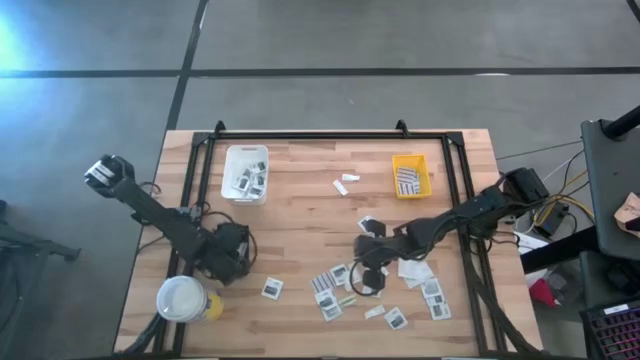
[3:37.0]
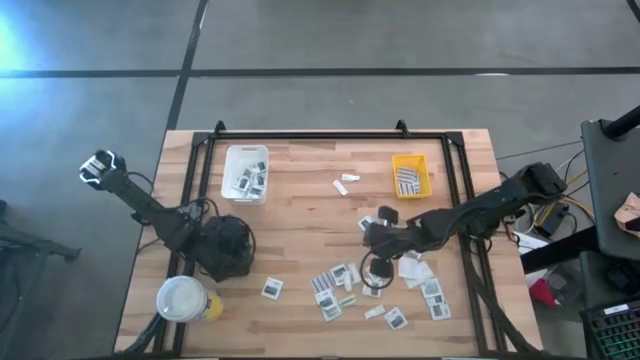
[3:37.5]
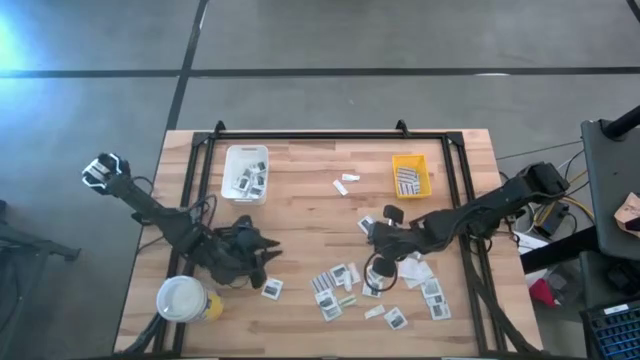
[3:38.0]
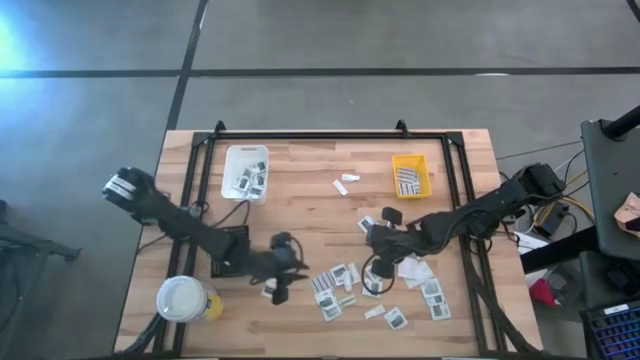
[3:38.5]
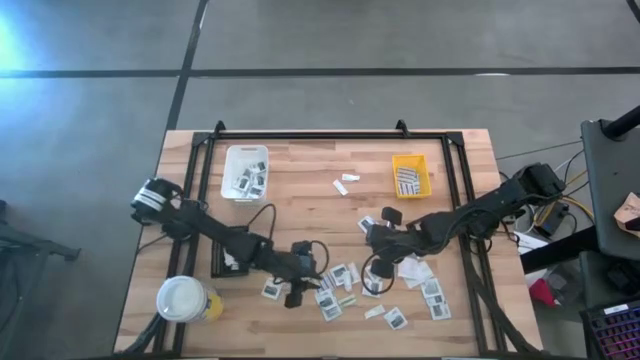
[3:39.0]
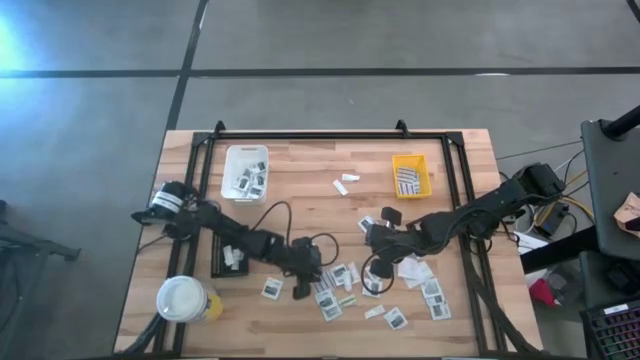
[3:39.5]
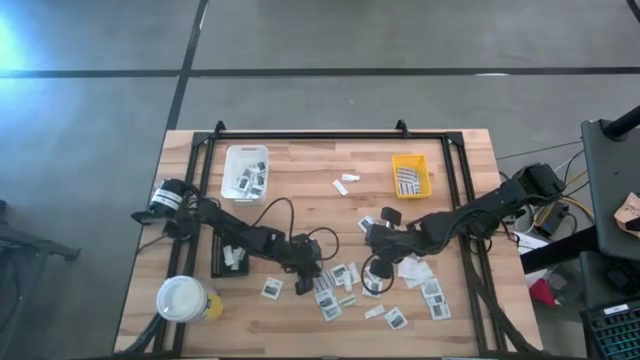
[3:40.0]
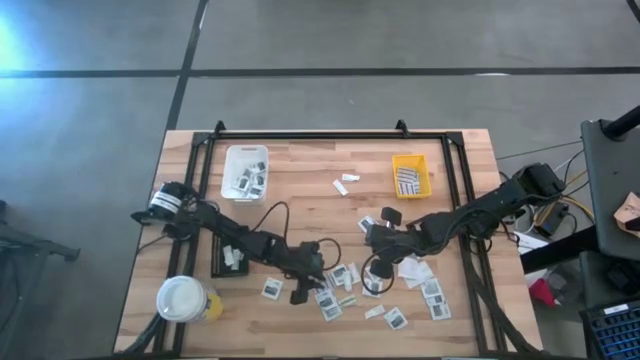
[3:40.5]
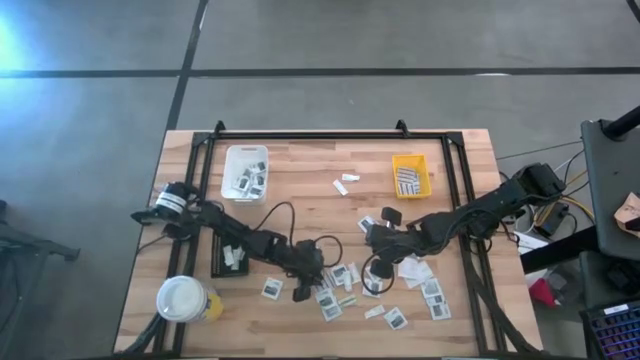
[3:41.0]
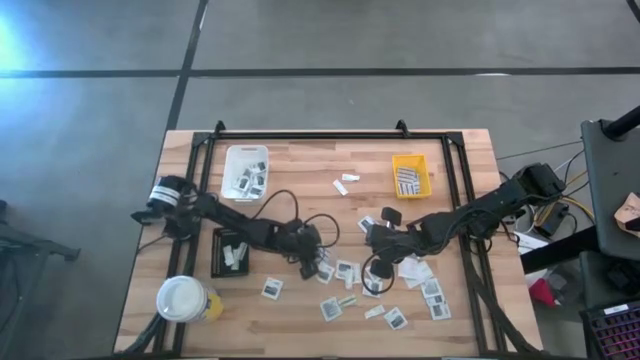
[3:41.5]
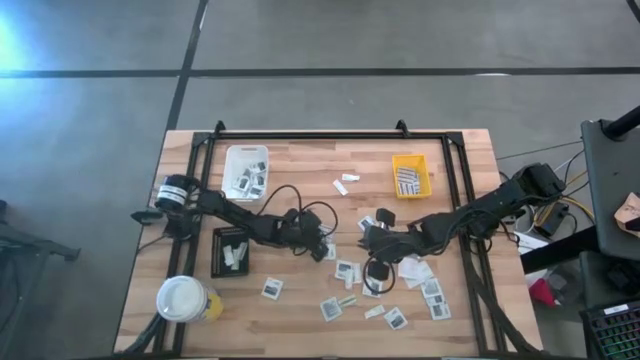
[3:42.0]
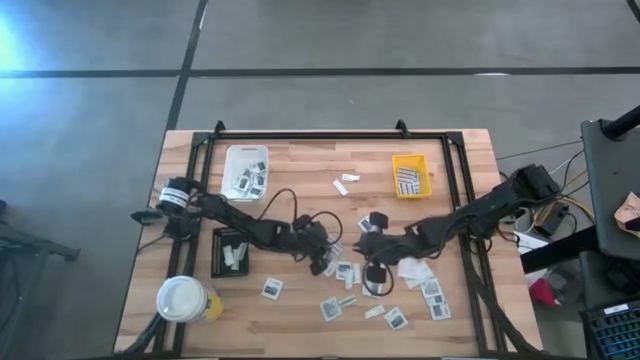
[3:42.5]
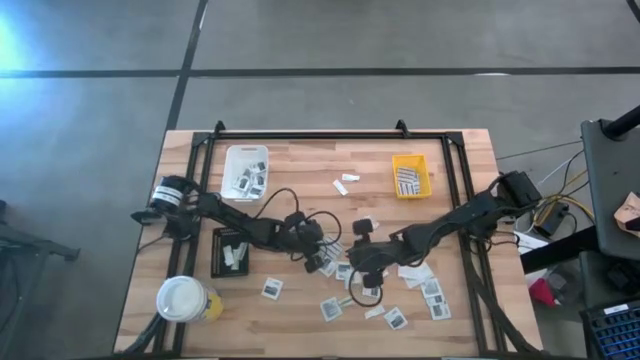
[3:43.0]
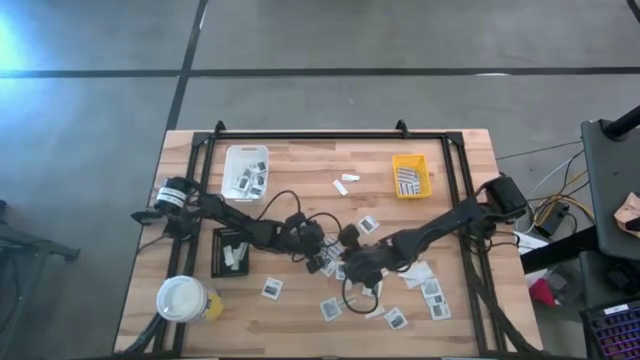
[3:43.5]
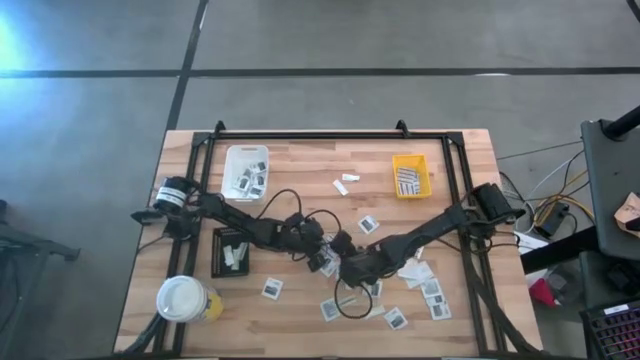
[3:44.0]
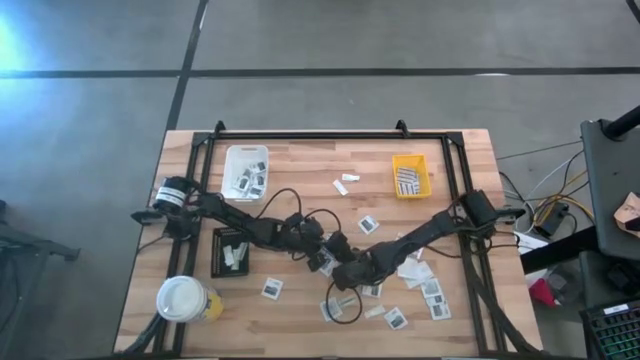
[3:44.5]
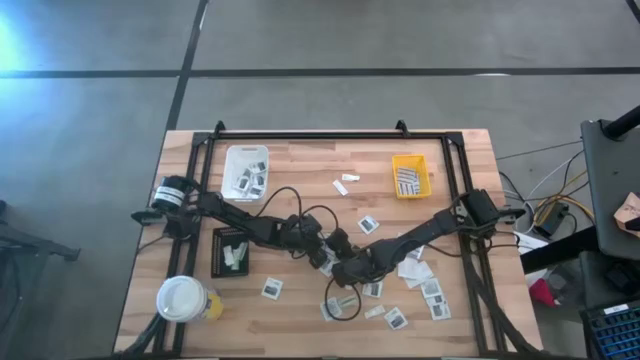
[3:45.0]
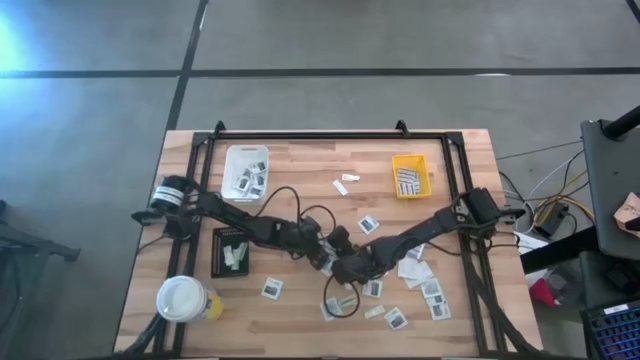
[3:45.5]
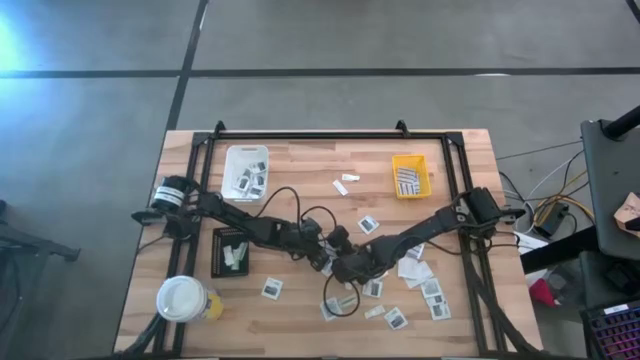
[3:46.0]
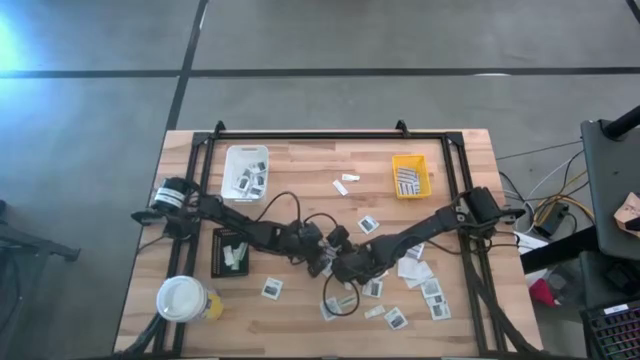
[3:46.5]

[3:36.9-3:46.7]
Task: Pick & Place First Aid Supplies
Put the blue bandage pack into the yellow bin

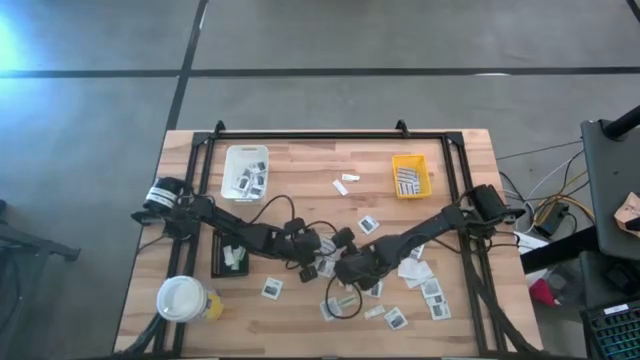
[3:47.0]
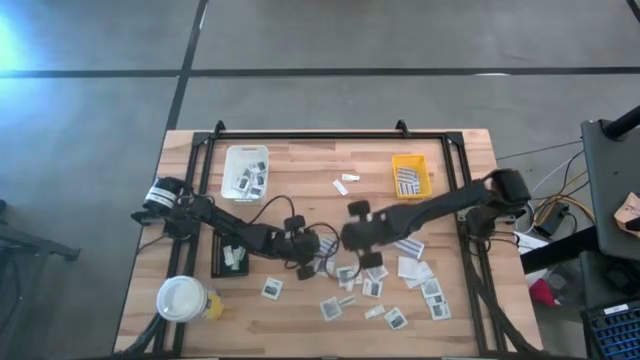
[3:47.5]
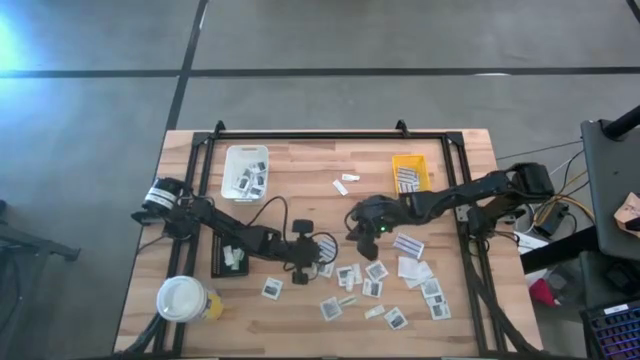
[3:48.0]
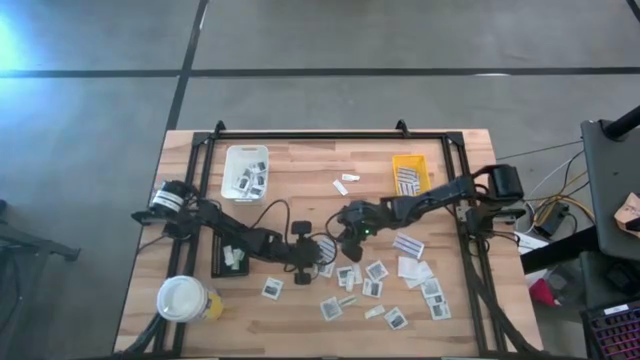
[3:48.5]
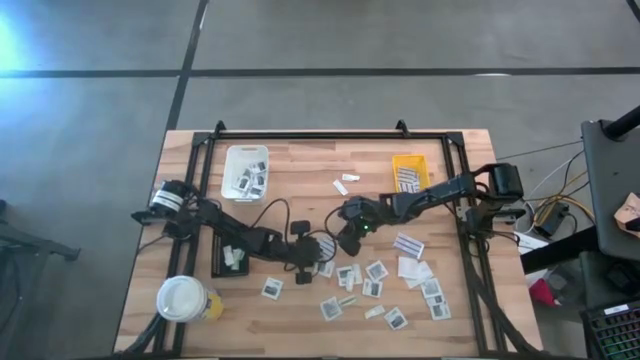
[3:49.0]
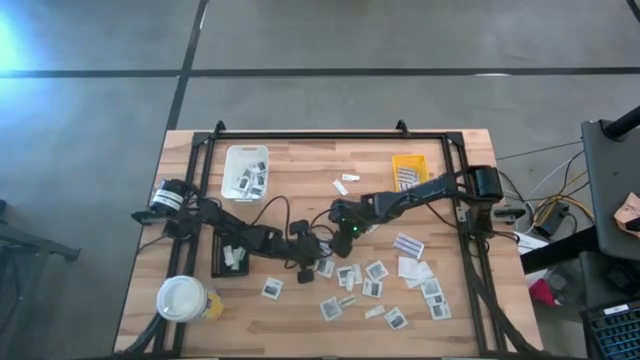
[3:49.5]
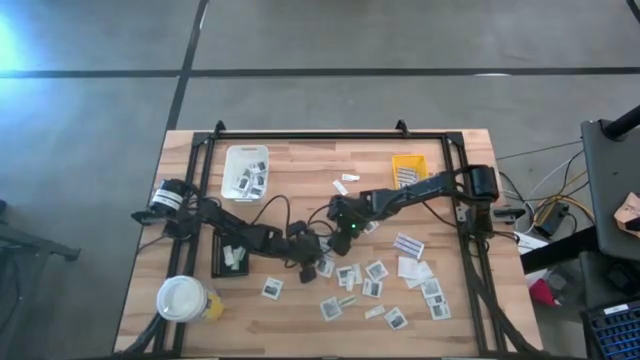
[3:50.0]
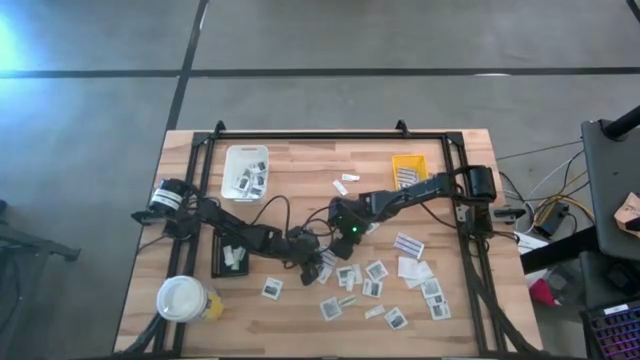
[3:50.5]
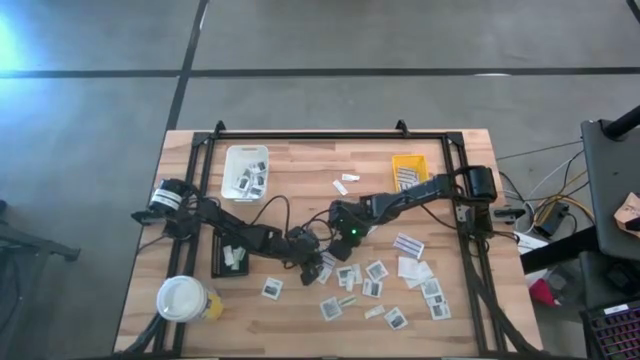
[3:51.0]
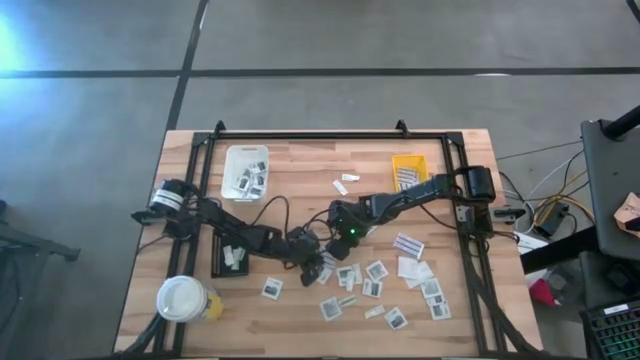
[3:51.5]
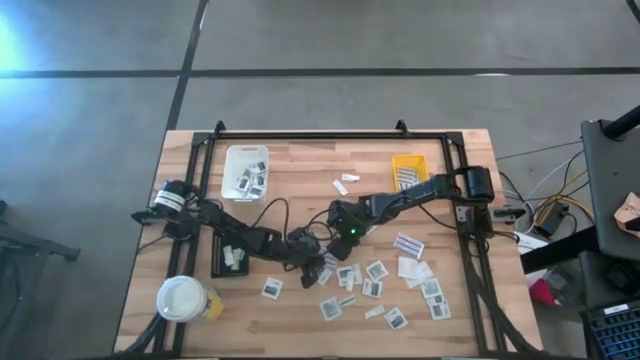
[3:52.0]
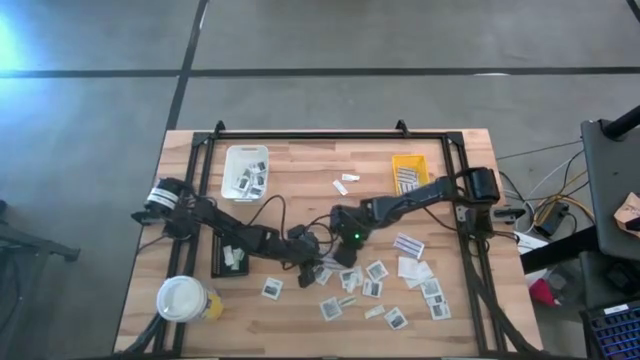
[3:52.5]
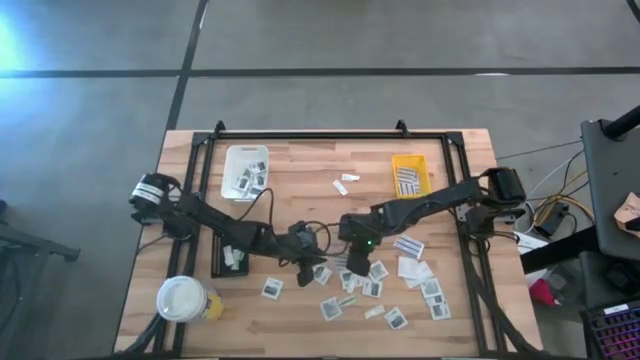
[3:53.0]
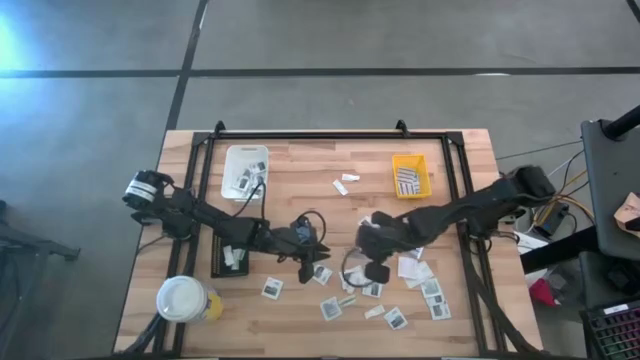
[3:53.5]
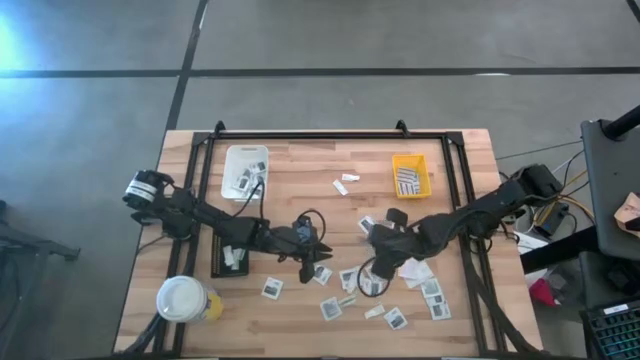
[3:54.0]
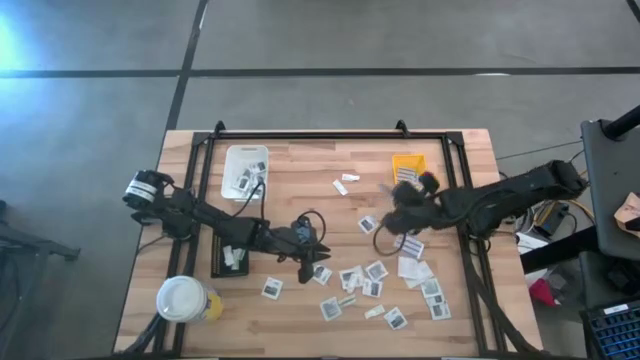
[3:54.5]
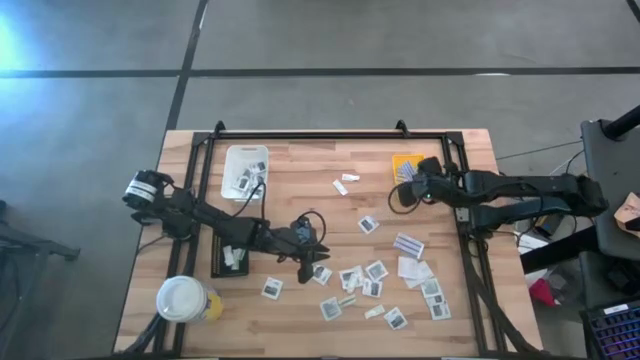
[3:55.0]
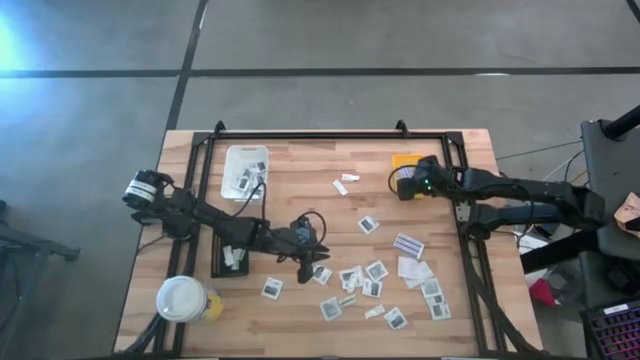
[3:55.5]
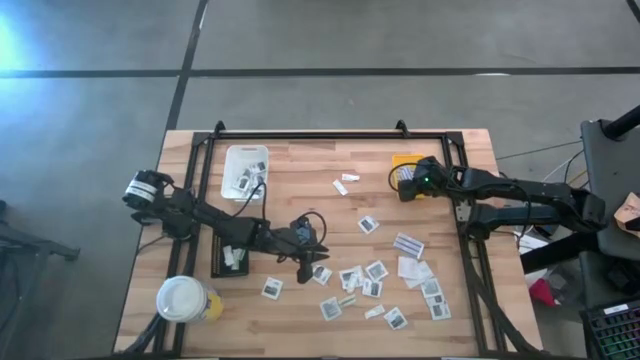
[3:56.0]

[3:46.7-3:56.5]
Put the blue bandage pack into the yellow bin

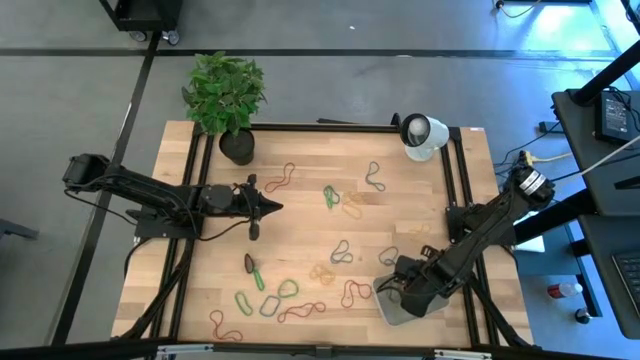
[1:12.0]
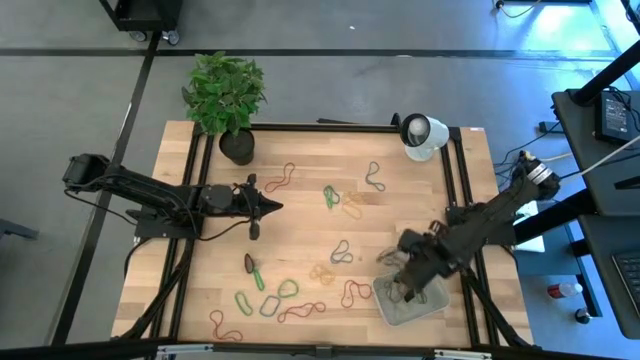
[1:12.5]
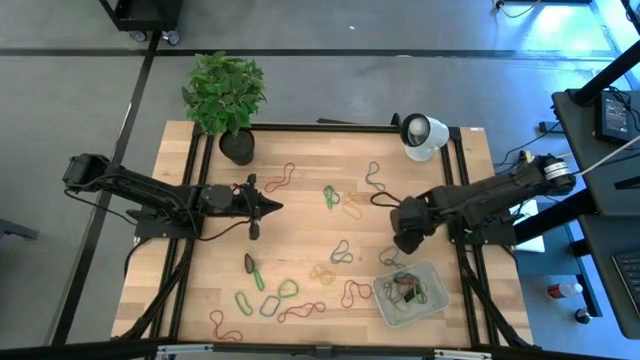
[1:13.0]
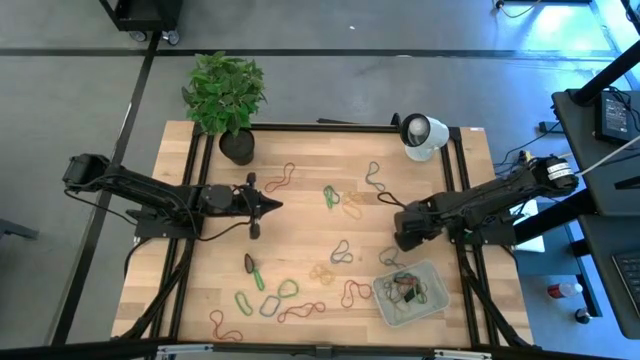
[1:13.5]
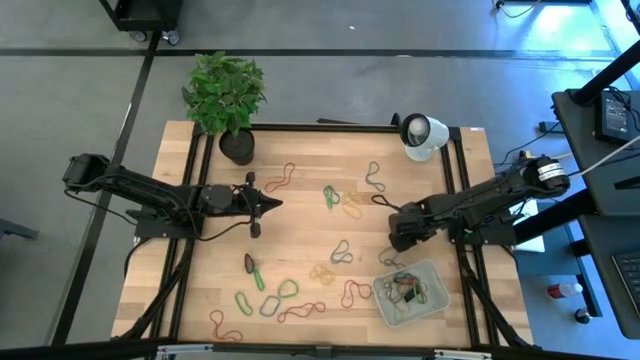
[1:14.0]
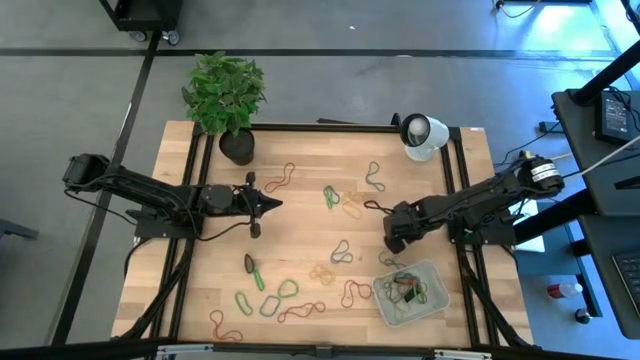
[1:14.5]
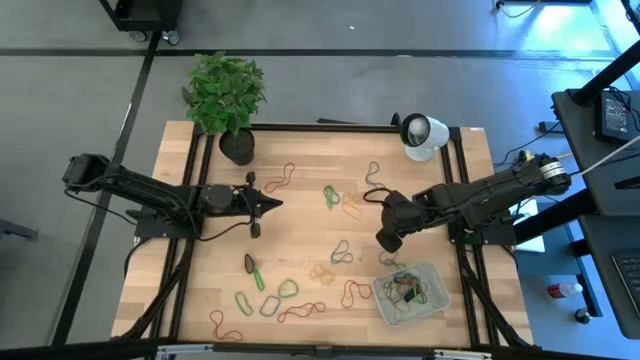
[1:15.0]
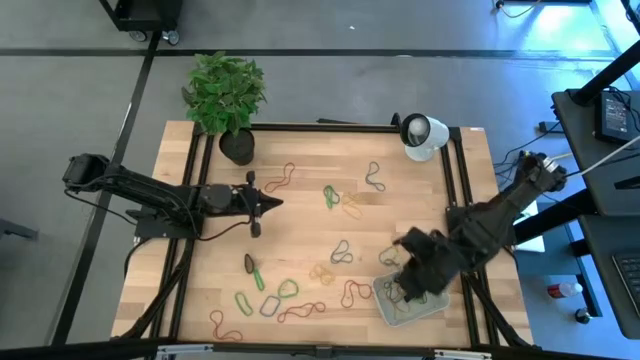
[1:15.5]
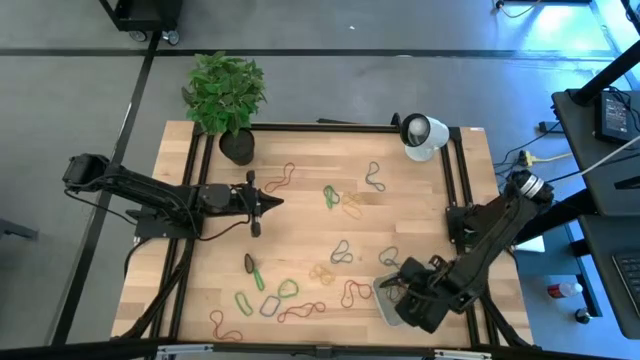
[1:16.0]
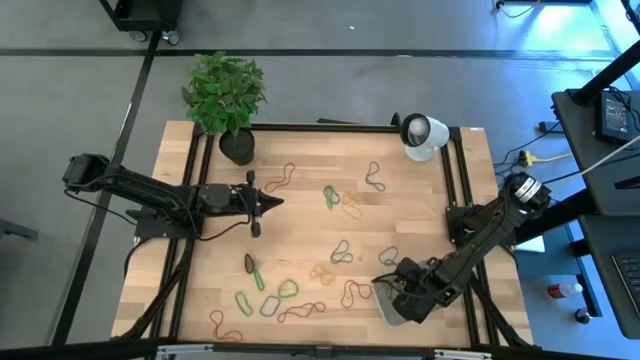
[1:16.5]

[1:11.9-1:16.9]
Task: Pick and place rubber bands into bin
Put the yellow rubber band into the white bin
